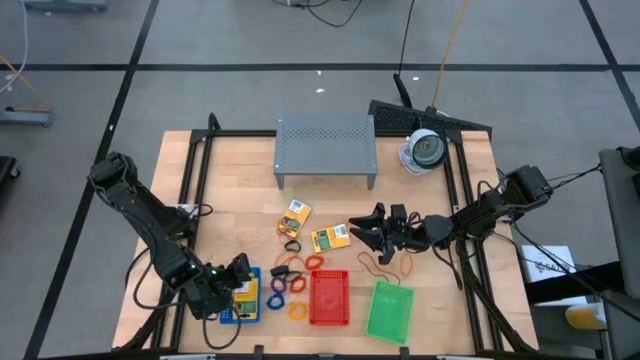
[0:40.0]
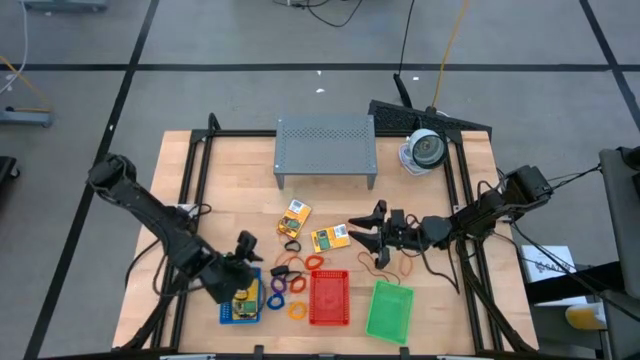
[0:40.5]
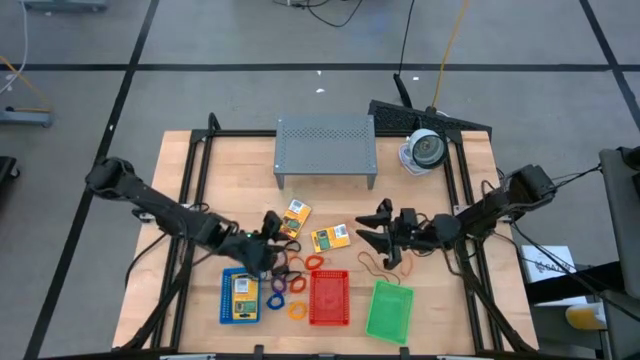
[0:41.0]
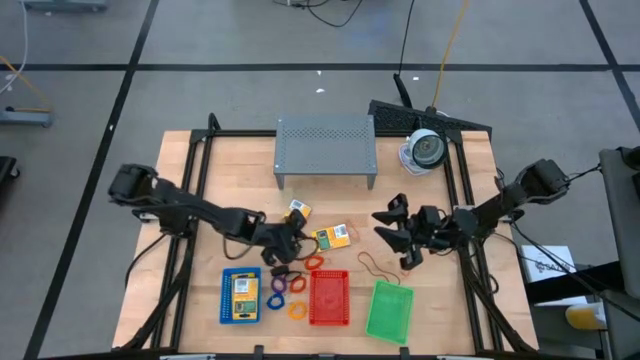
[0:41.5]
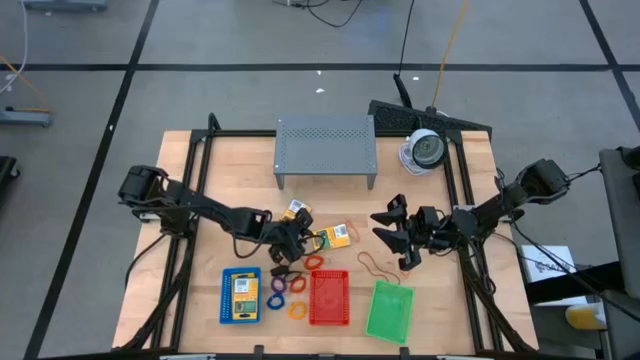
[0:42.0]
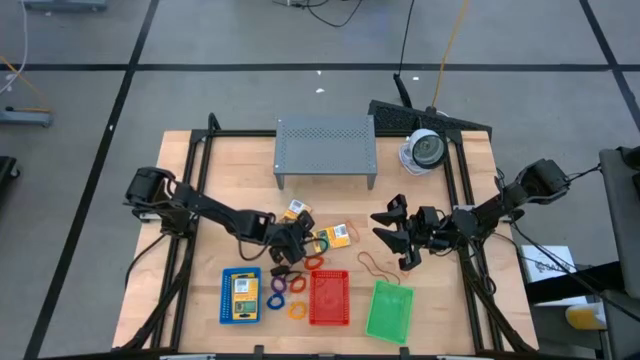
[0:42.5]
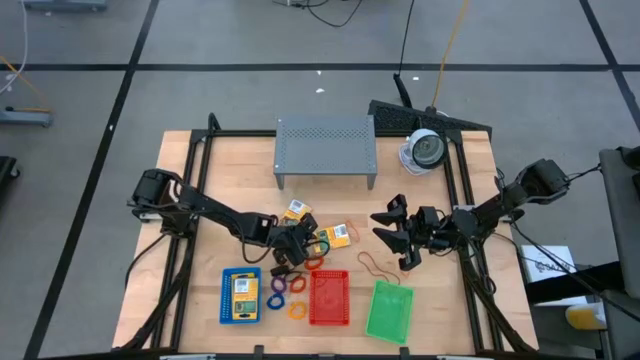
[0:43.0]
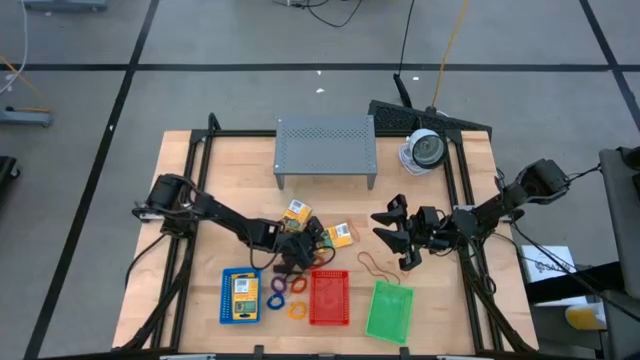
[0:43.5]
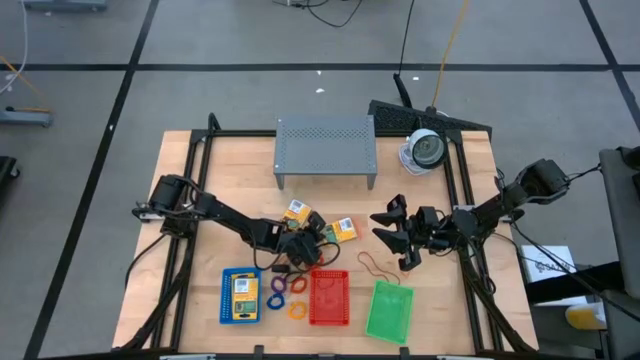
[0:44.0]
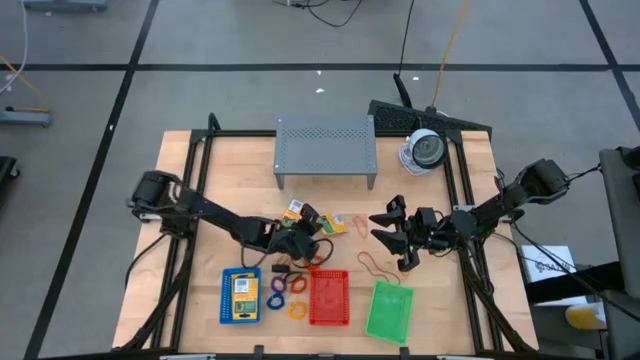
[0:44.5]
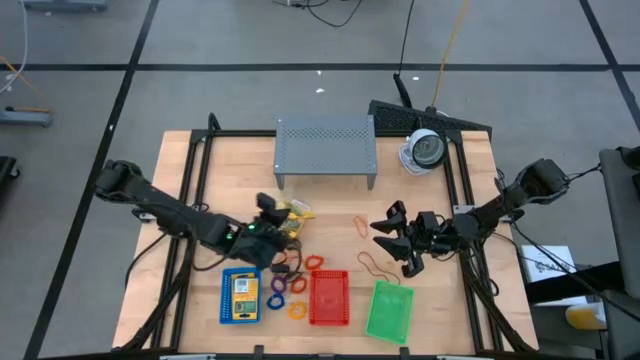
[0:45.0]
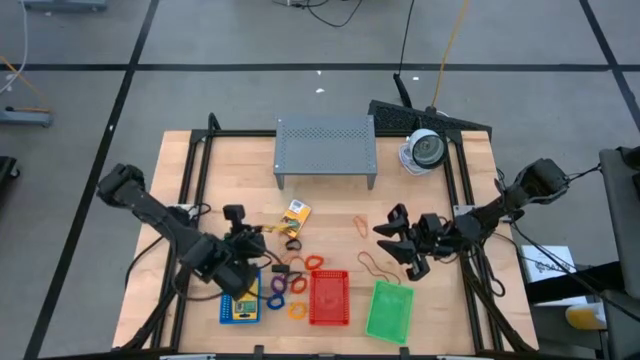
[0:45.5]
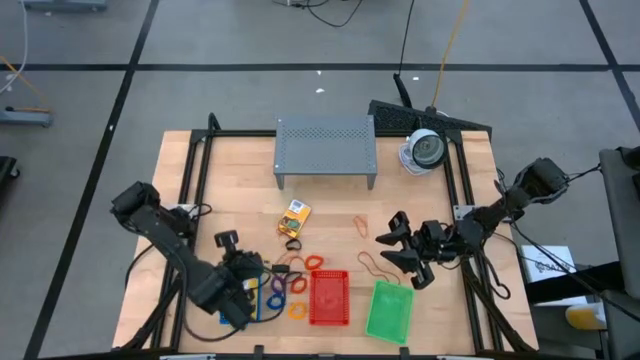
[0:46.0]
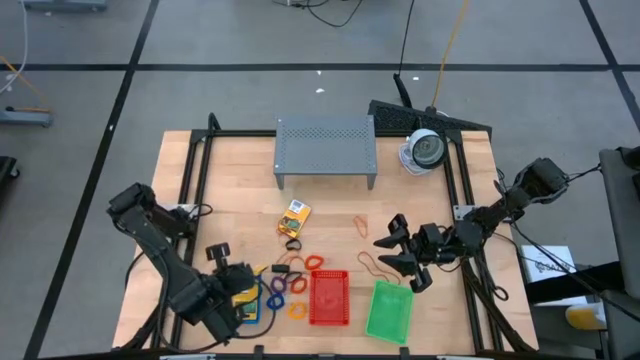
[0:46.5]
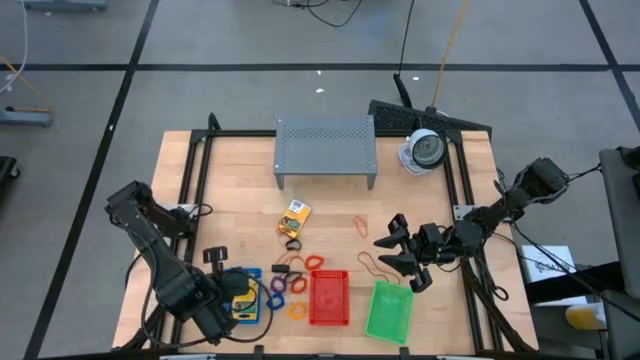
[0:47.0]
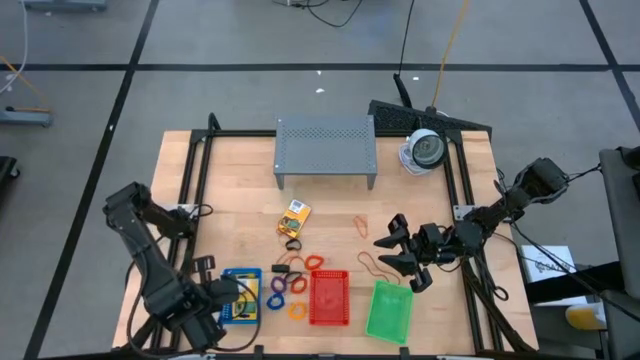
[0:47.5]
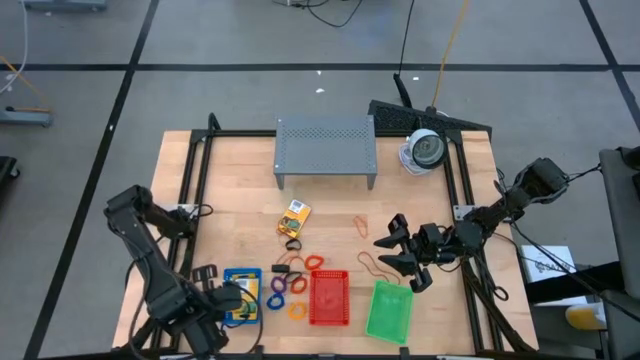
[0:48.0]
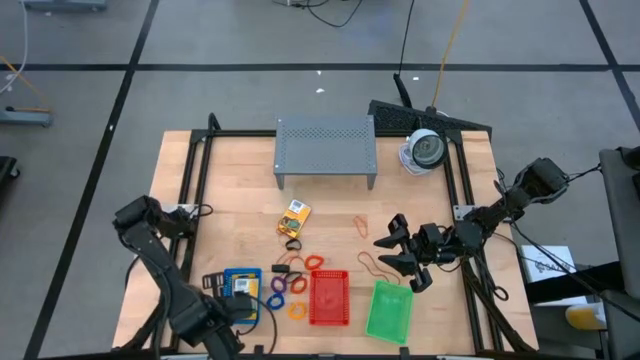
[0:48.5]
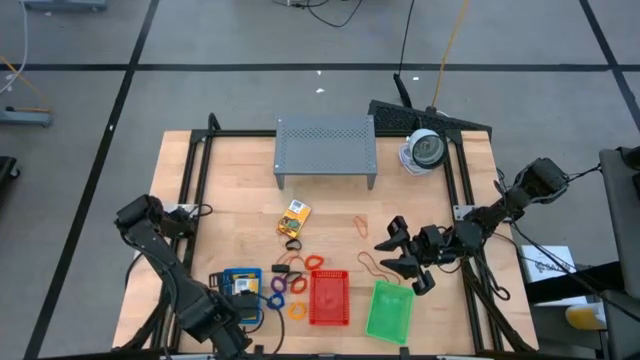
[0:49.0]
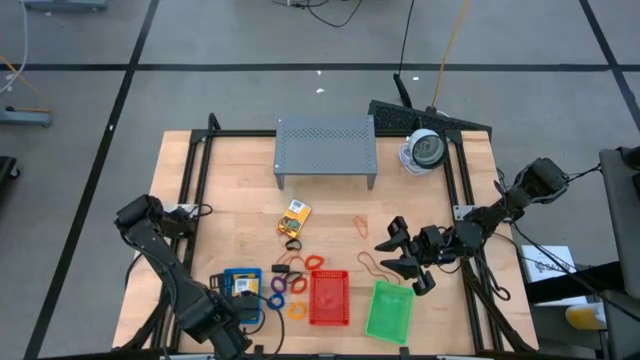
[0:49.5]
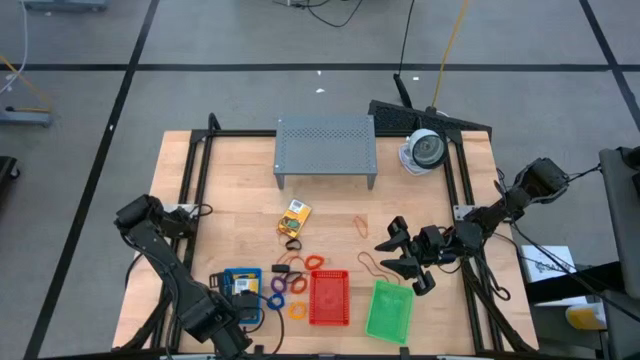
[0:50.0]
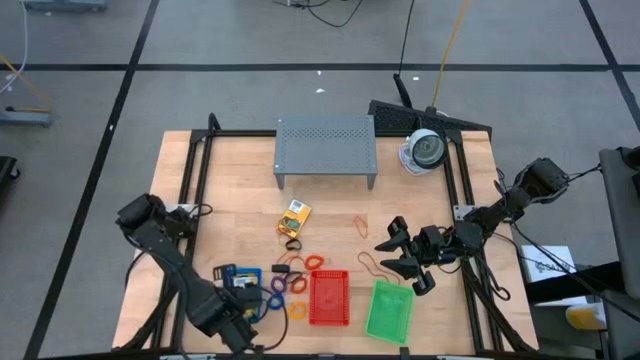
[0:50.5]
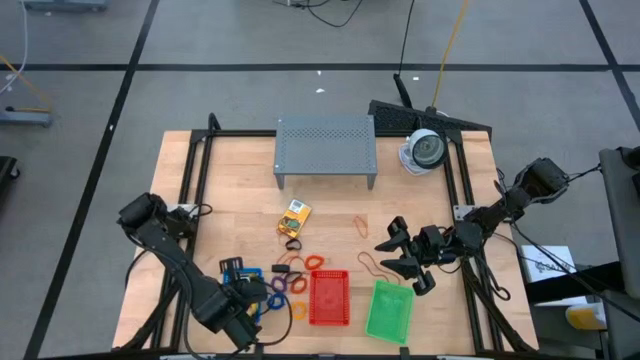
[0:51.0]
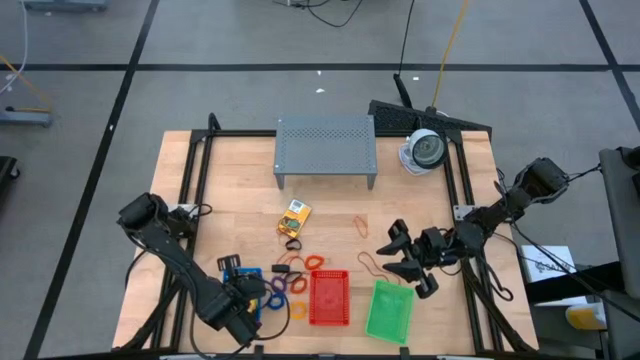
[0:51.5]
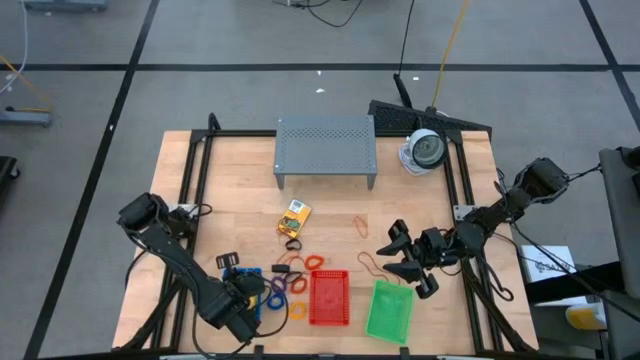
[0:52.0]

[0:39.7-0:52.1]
Task: Pick & Place Office Desk Supplies
Put the crayon box into the blue bin

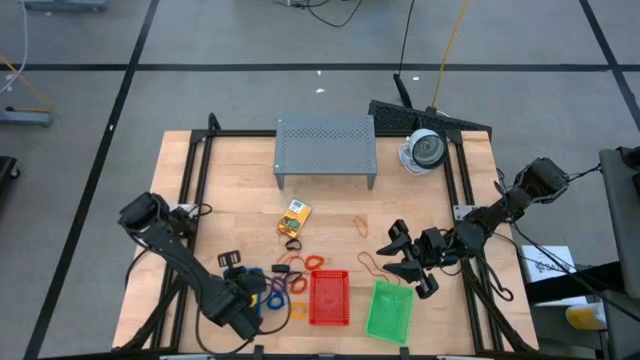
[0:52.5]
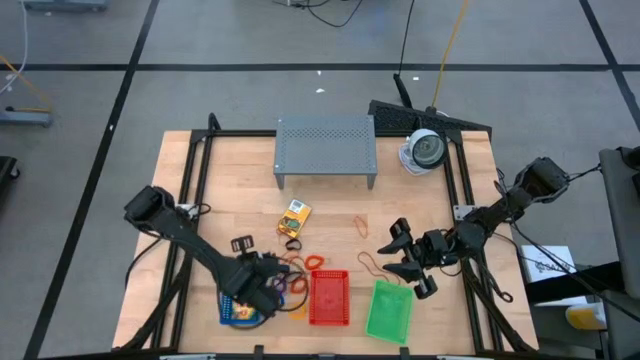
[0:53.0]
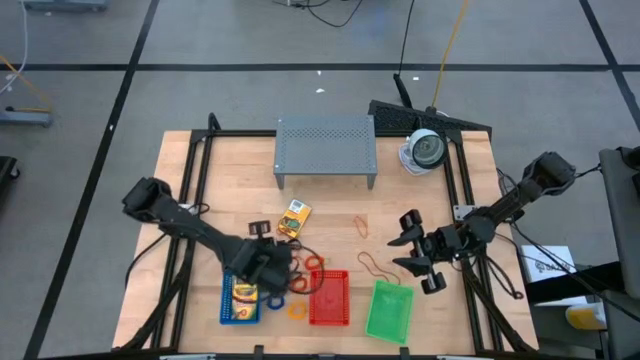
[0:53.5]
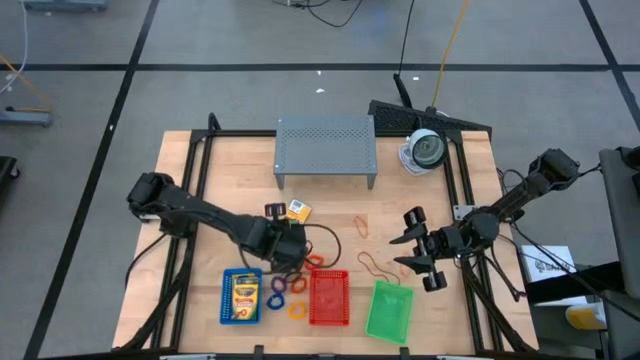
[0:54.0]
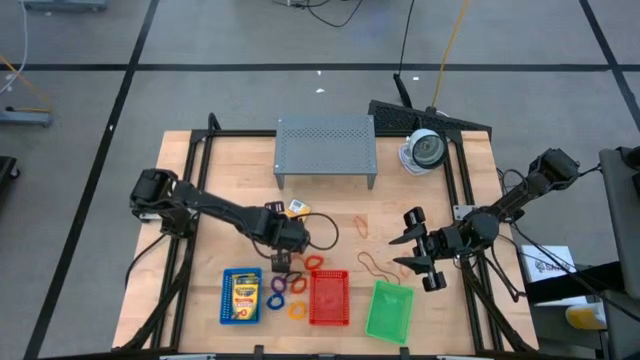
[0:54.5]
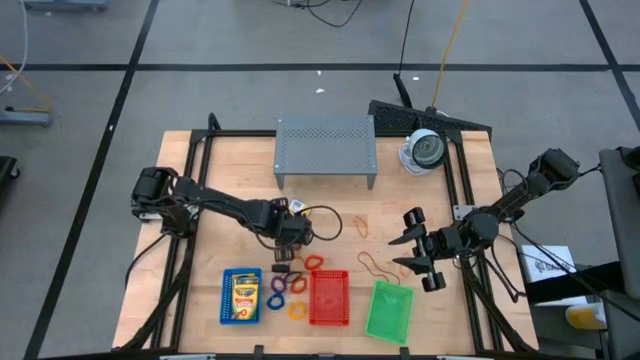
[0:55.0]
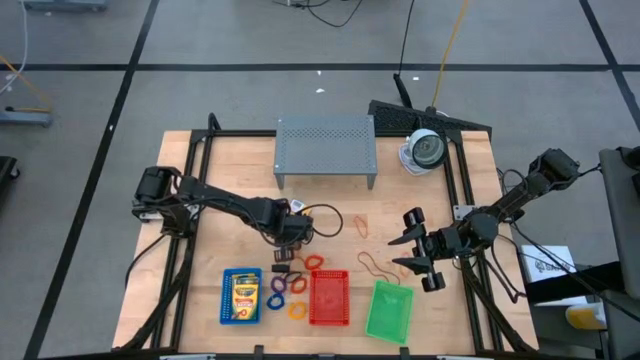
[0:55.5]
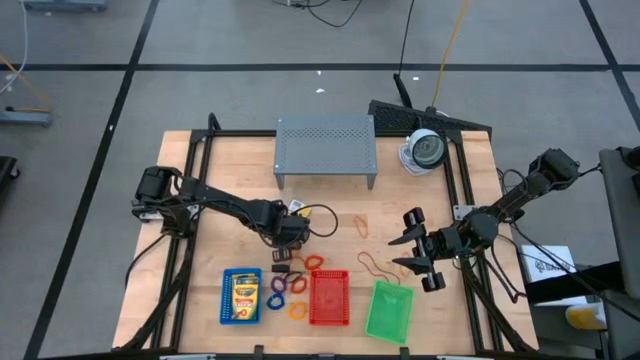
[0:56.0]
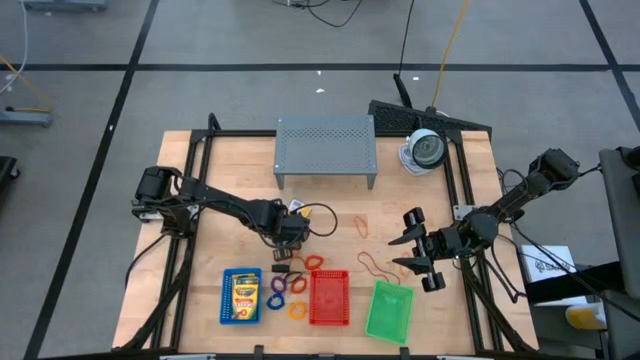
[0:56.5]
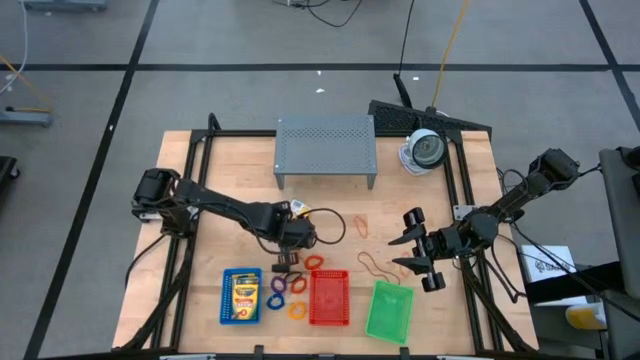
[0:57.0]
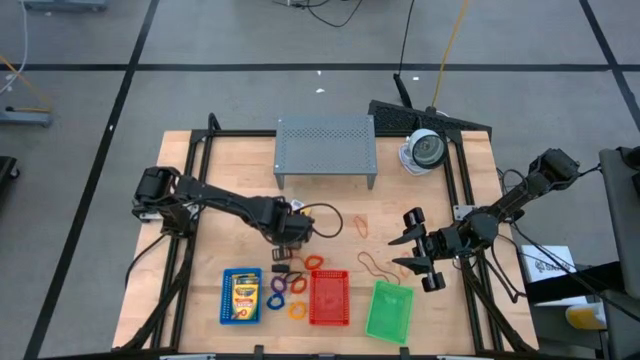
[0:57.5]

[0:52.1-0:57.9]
Put the red rubber band into the red bin

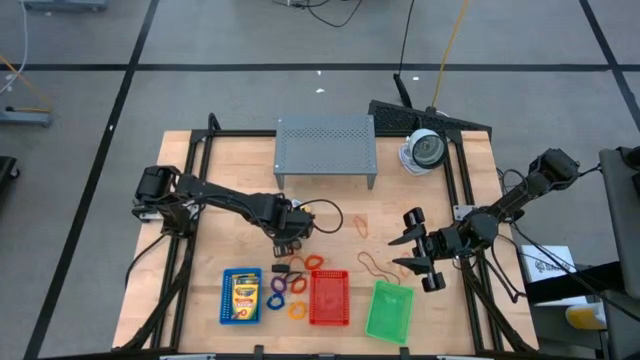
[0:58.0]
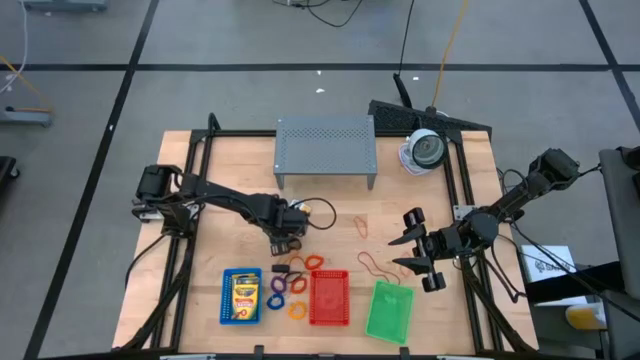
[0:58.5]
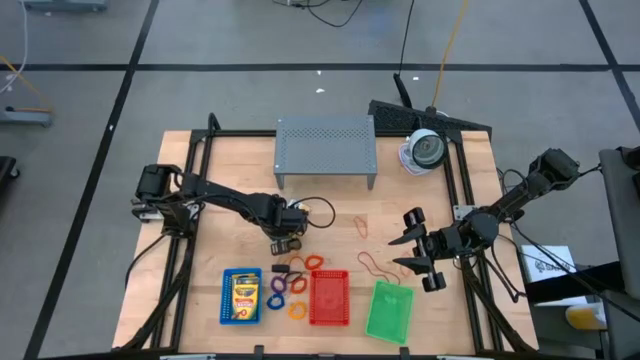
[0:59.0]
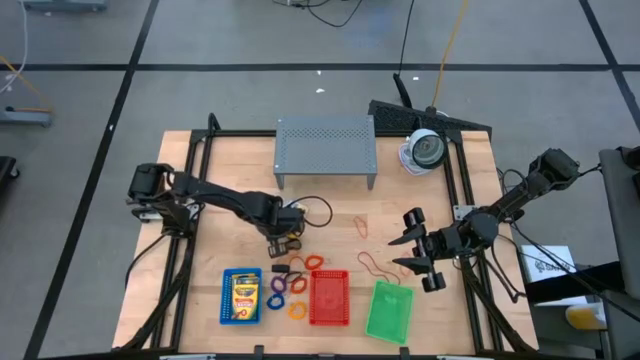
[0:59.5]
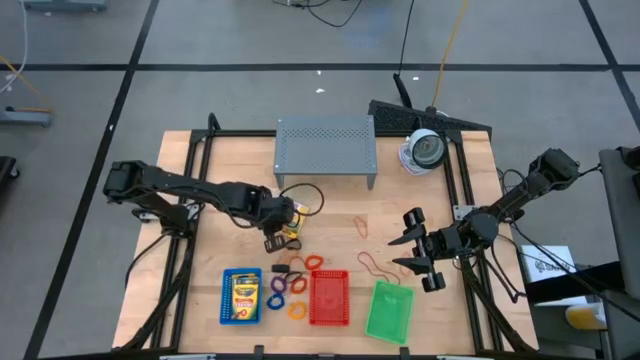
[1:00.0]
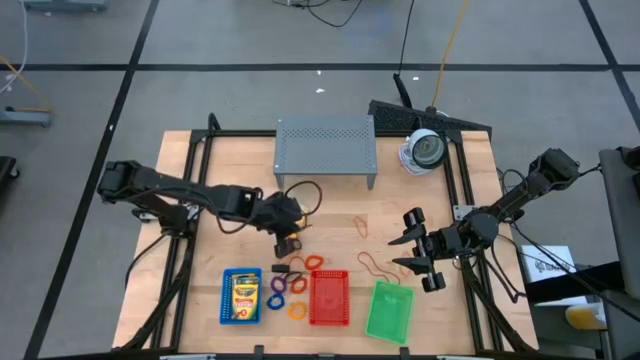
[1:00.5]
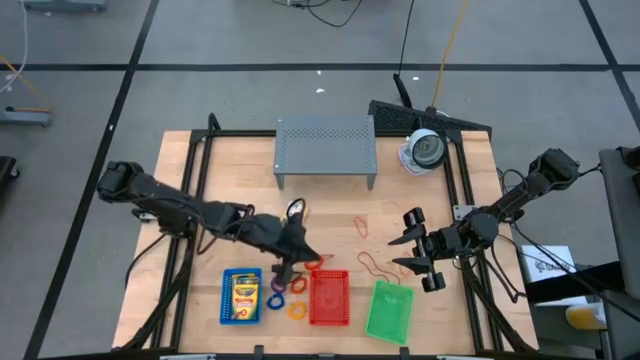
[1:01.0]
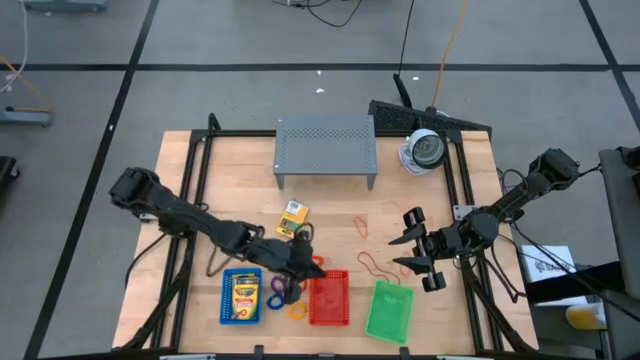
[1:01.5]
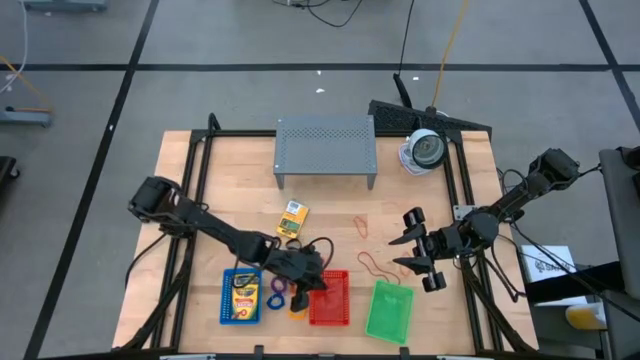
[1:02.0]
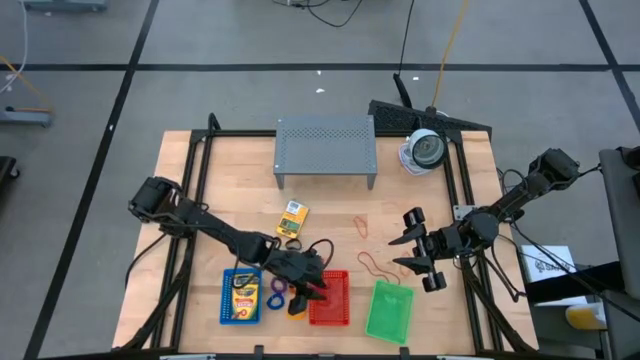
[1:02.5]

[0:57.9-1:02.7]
Put the red rubber band into the red bin
